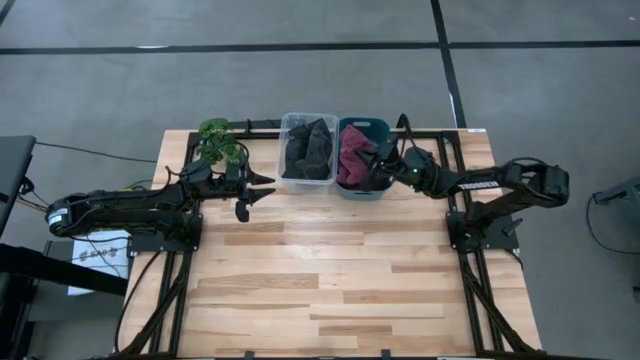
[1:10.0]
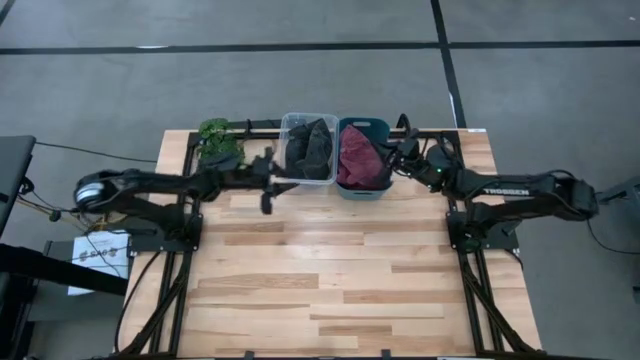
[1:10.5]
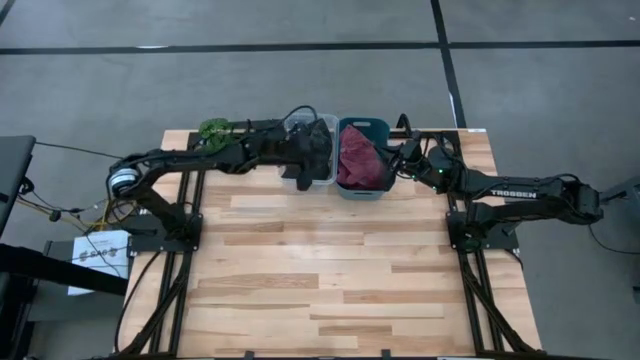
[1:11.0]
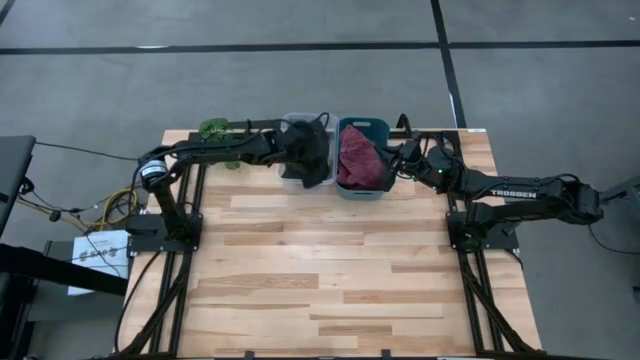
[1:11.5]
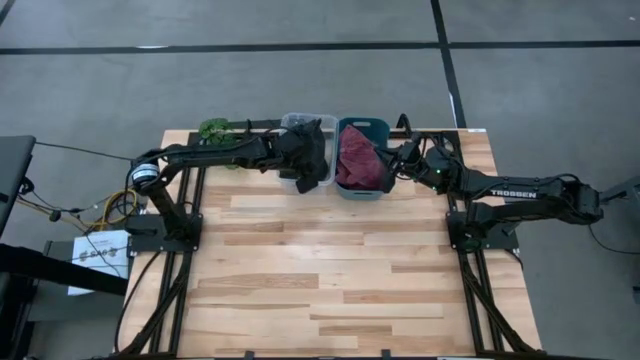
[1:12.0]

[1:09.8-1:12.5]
Task: Pick & Place hat
Adjust the black cap

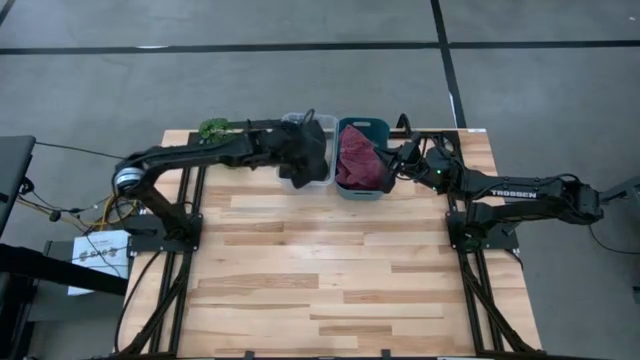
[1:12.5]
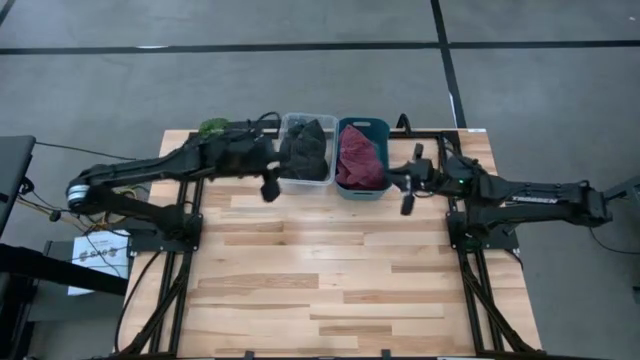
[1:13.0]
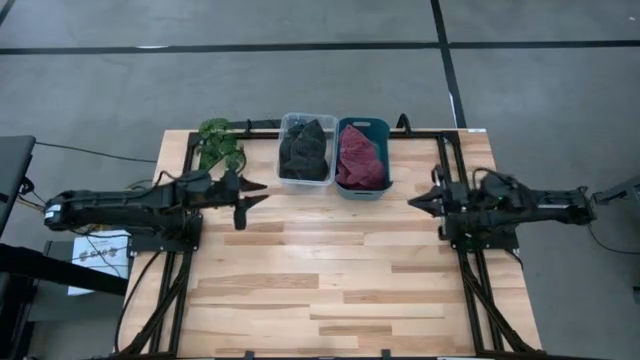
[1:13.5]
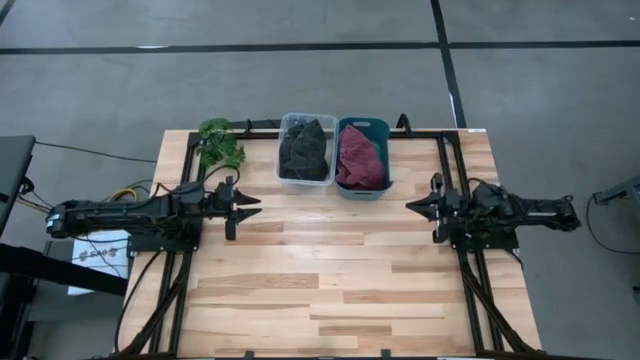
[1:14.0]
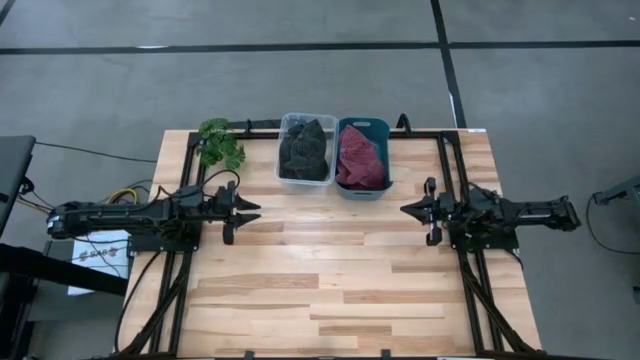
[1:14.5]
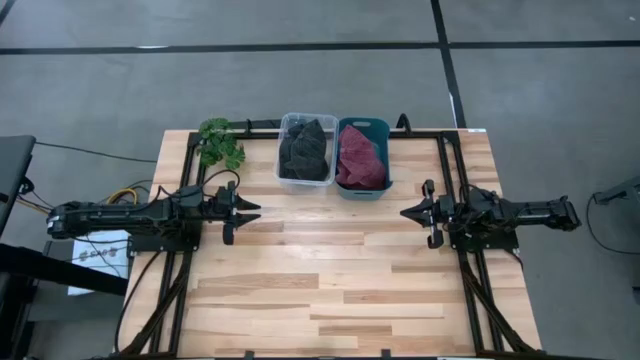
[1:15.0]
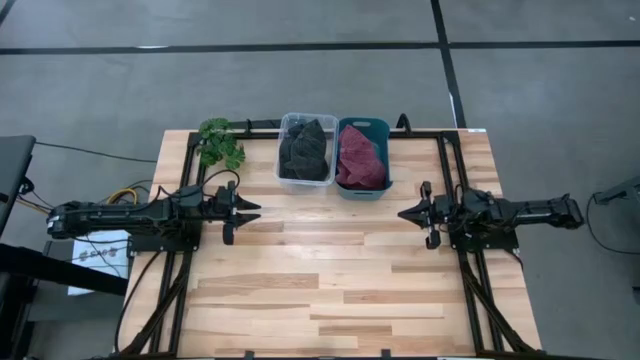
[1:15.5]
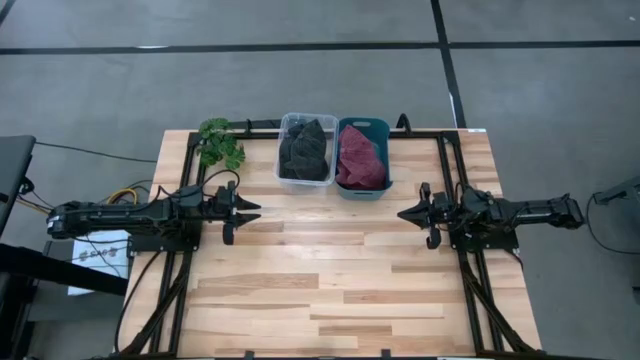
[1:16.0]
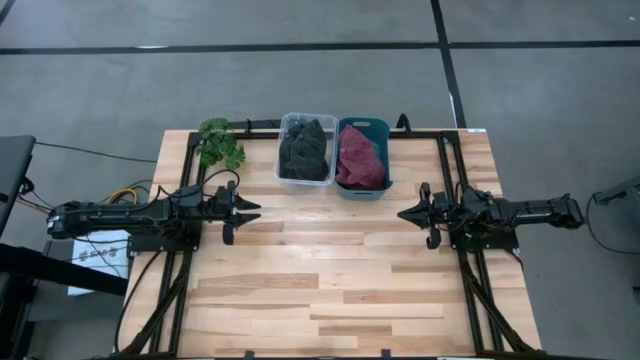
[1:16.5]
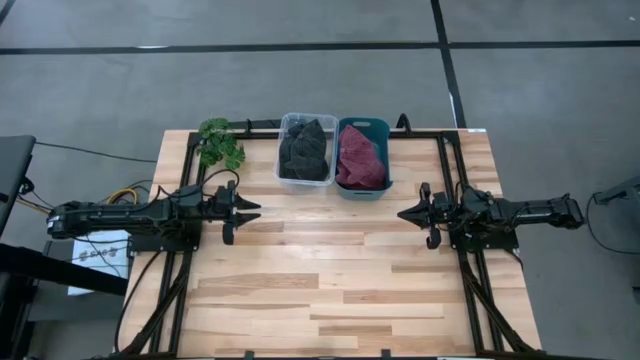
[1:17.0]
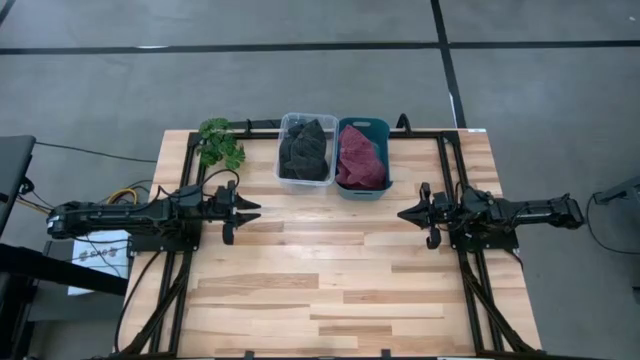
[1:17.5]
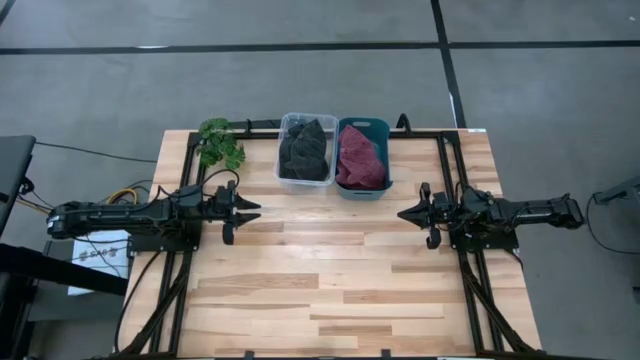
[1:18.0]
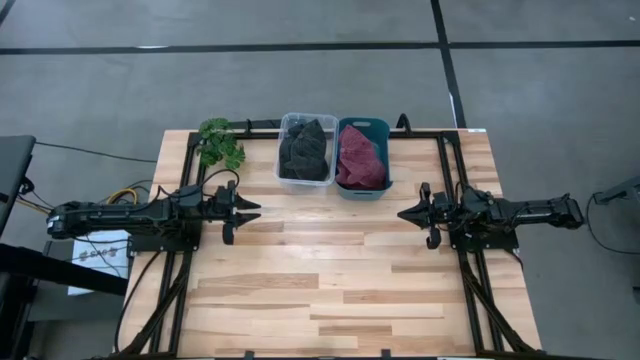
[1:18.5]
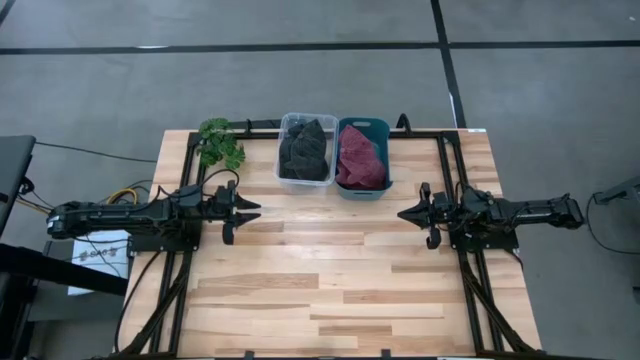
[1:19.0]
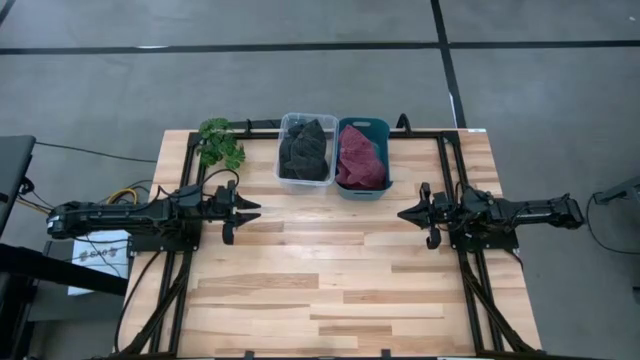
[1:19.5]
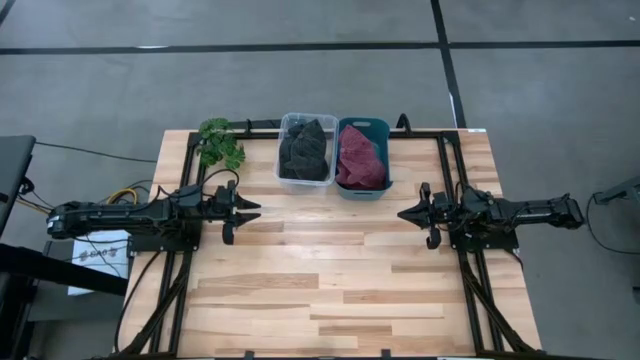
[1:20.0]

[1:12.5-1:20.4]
Return to Home Position

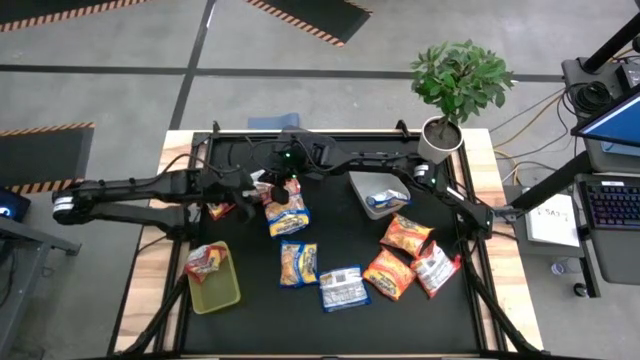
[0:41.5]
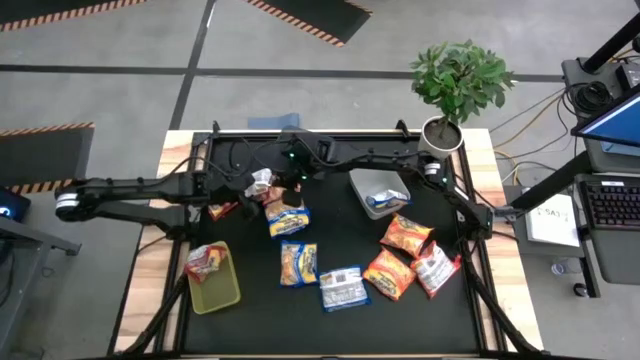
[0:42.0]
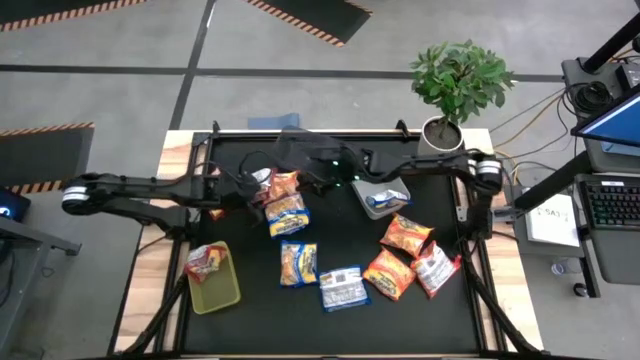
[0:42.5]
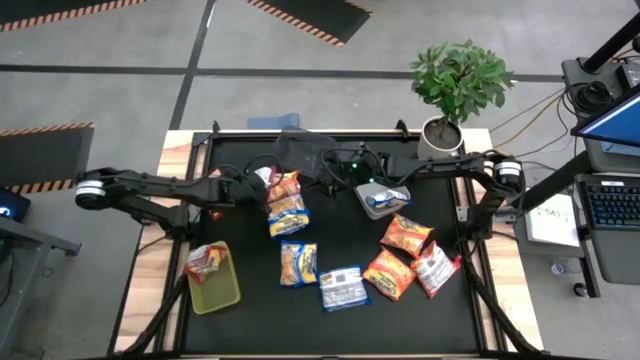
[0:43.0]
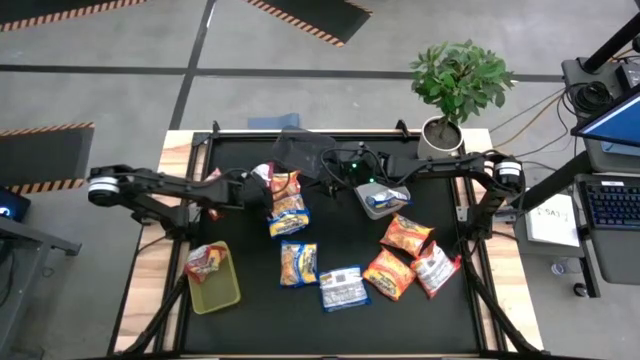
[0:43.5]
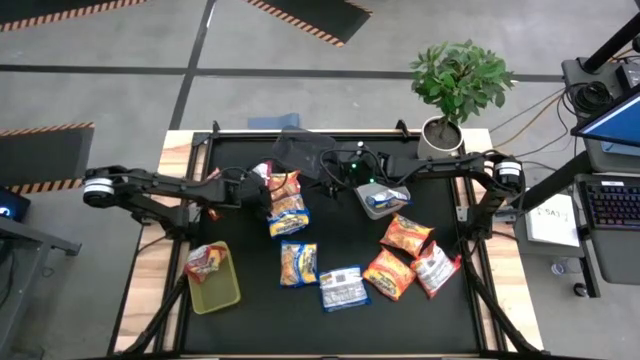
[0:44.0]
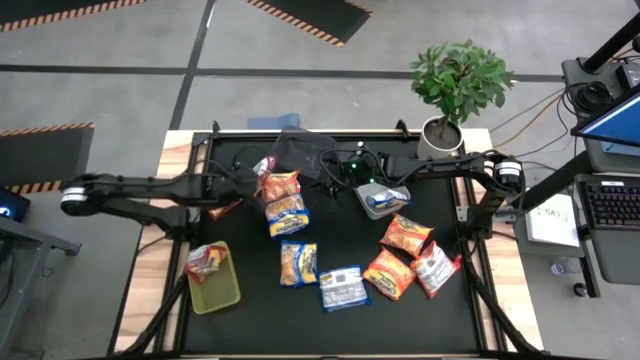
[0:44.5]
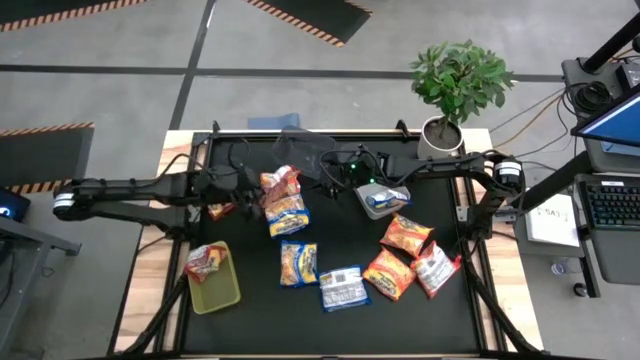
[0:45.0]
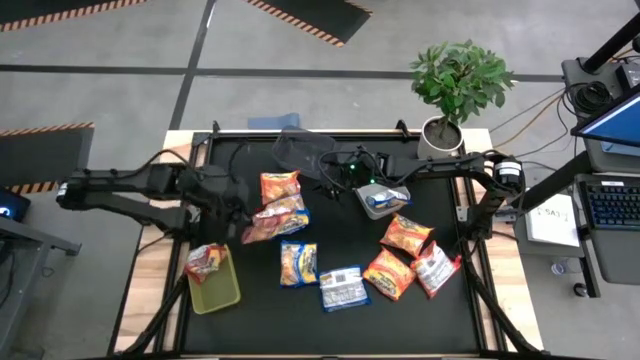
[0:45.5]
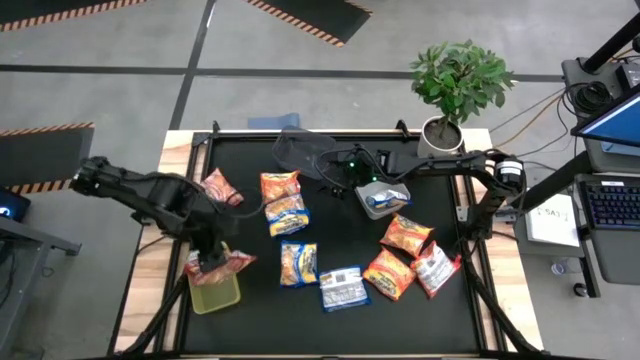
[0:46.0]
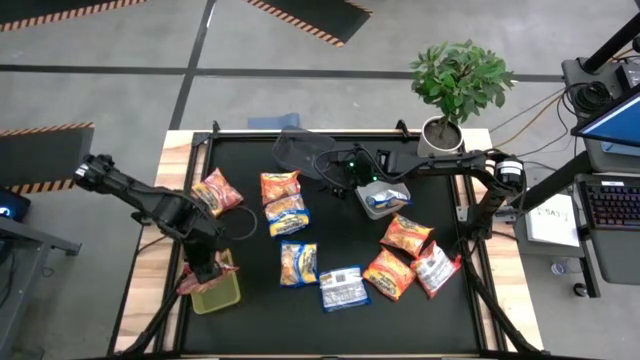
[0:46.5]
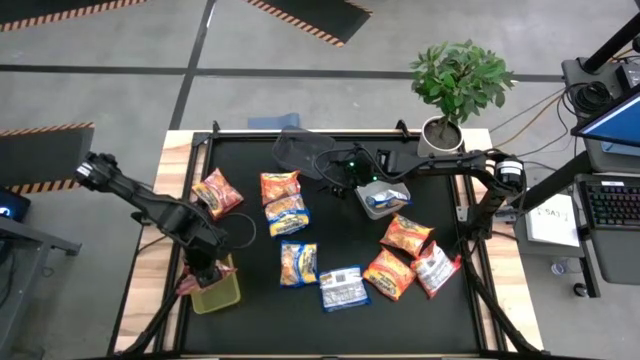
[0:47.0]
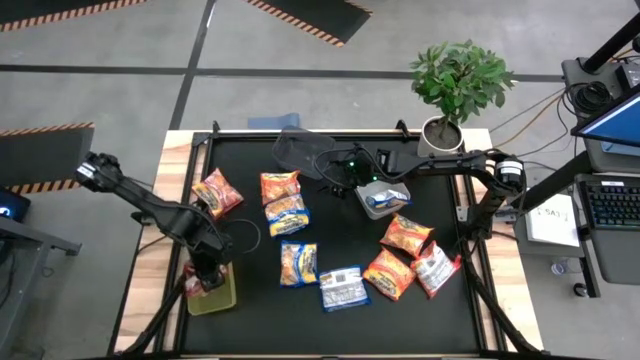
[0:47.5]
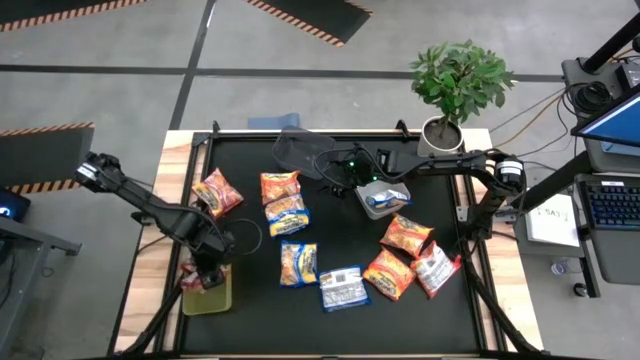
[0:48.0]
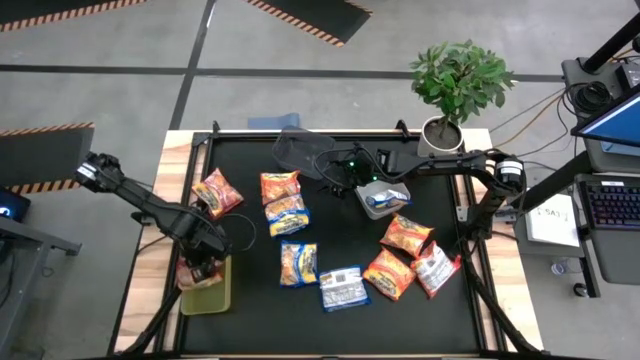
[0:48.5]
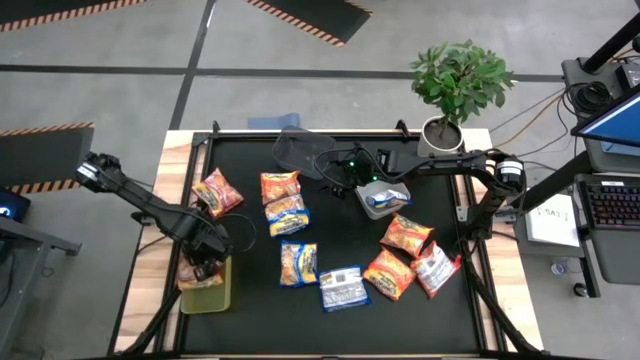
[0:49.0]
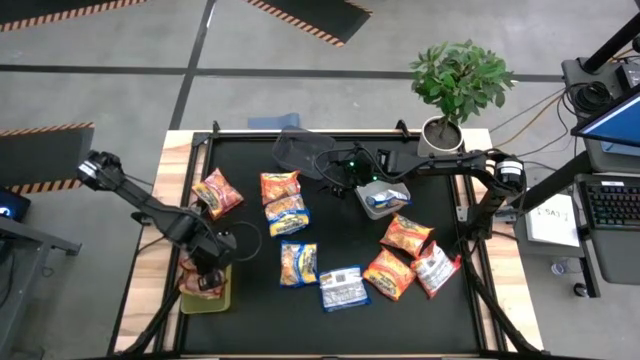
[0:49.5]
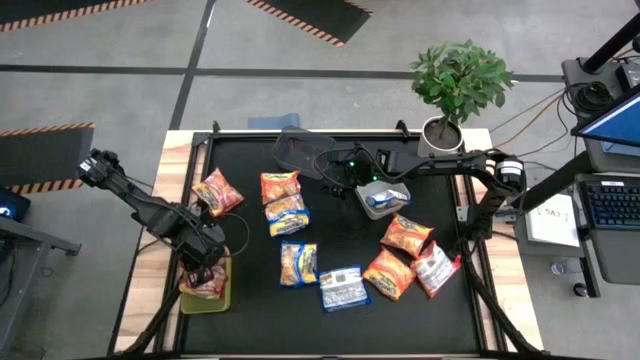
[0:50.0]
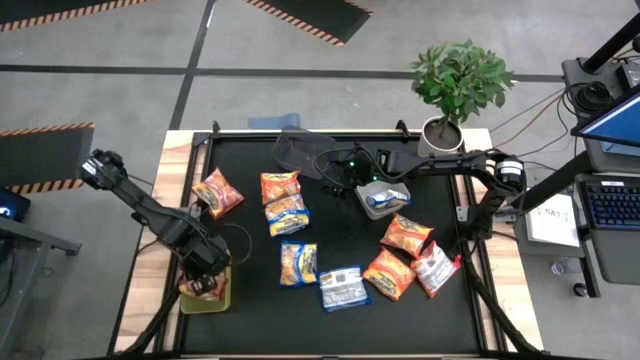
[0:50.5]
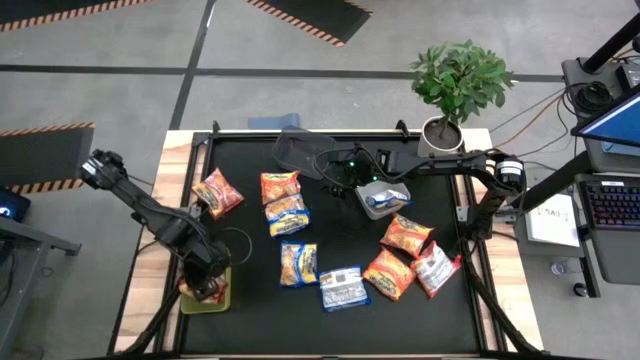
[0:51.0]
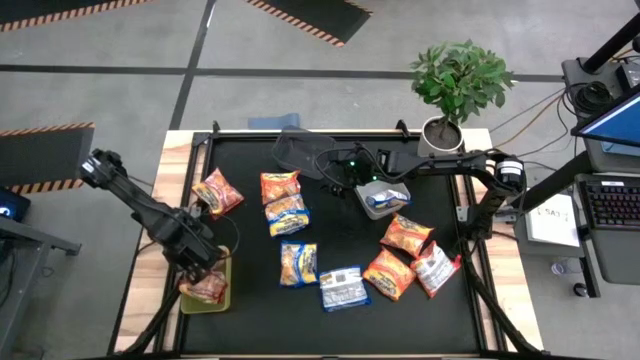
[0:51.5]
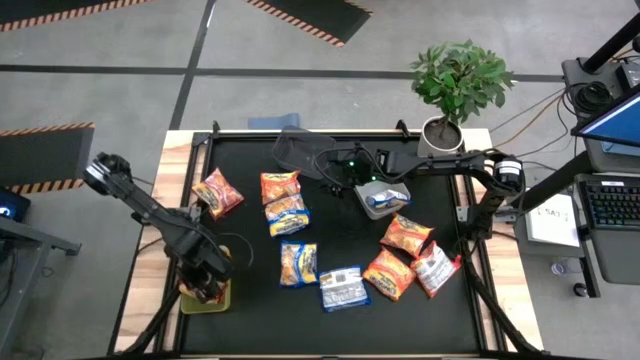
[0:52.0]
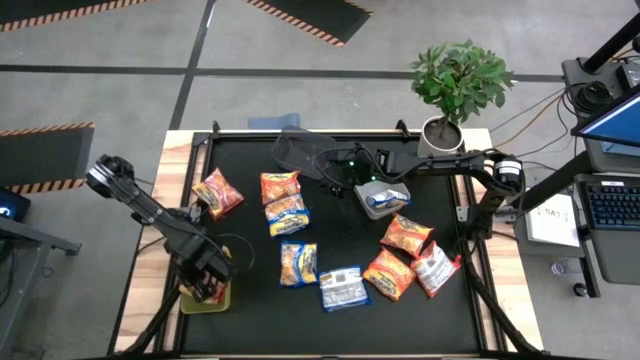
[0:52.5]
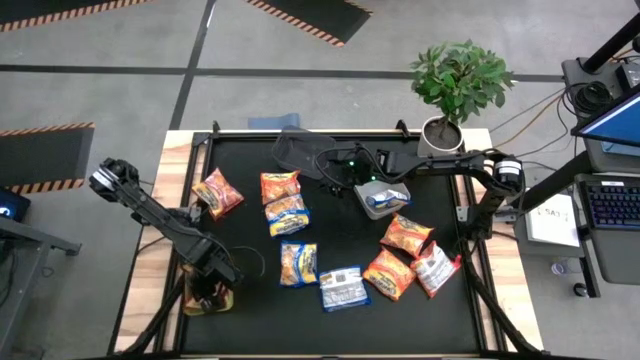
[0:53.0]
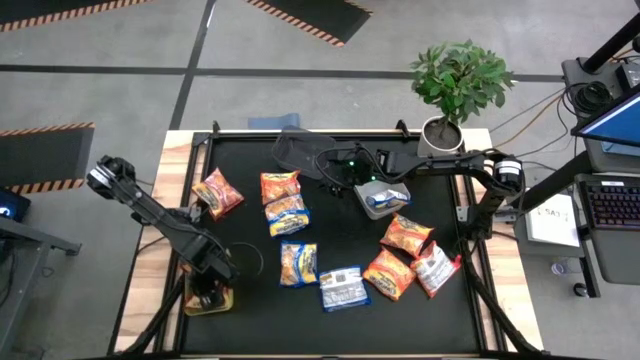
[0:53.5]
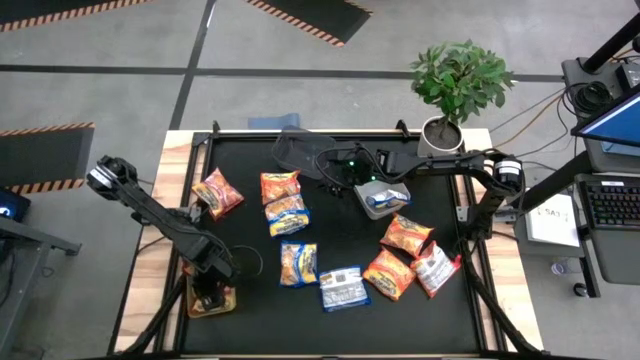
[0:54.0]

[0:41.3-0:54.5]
Task: Sort Maruchan noodles
Put the red noodle pack into the yellow bin
